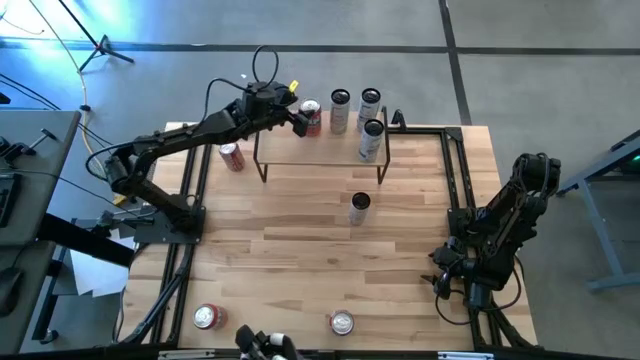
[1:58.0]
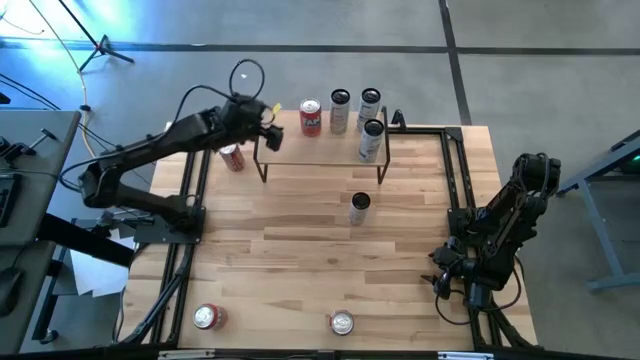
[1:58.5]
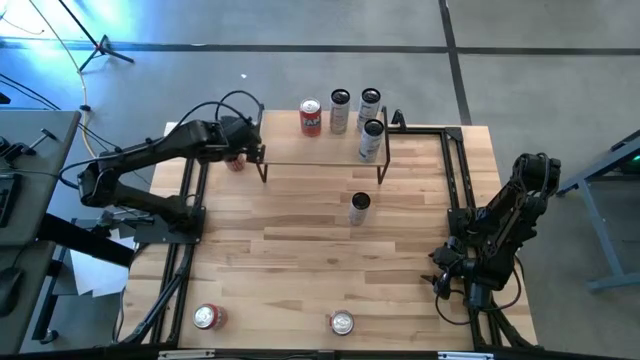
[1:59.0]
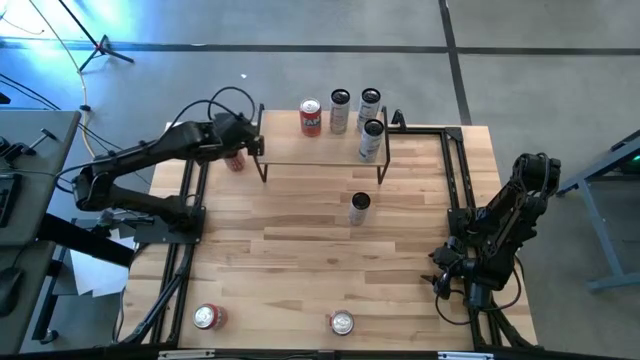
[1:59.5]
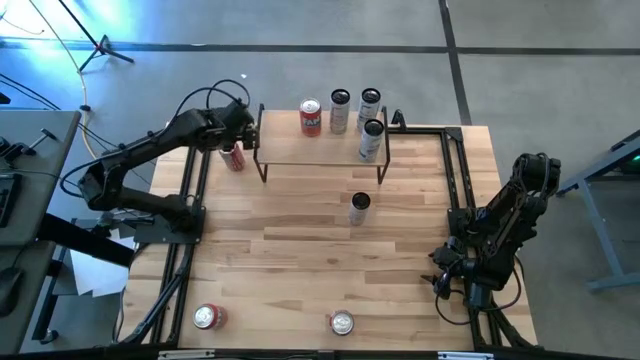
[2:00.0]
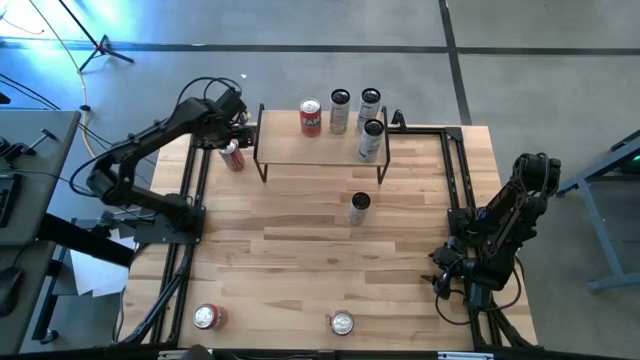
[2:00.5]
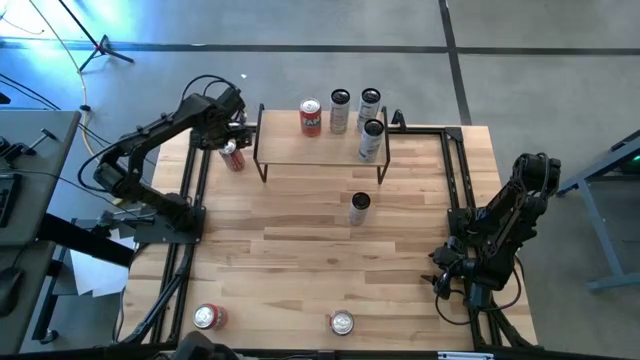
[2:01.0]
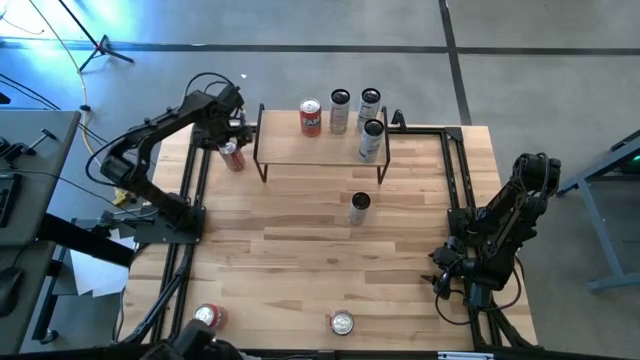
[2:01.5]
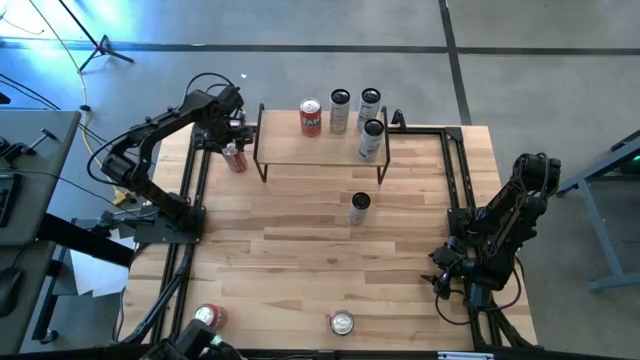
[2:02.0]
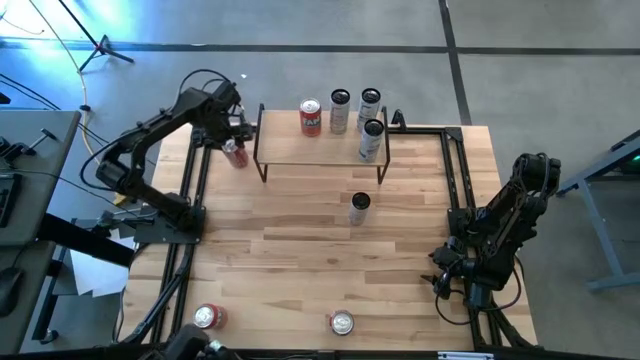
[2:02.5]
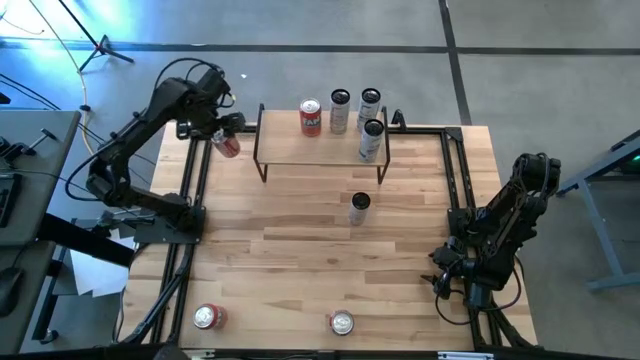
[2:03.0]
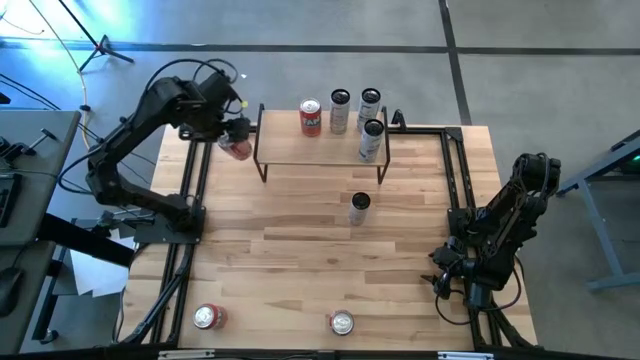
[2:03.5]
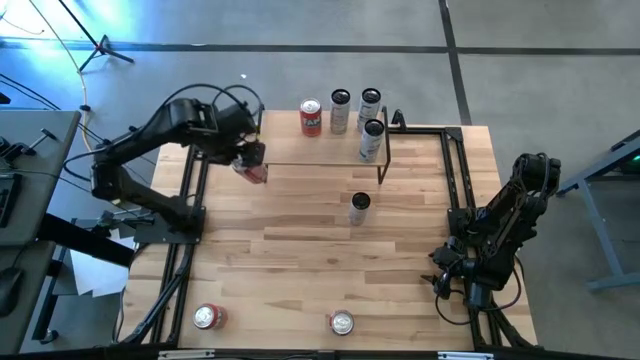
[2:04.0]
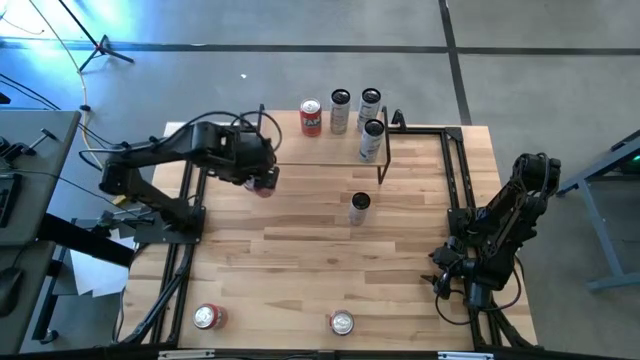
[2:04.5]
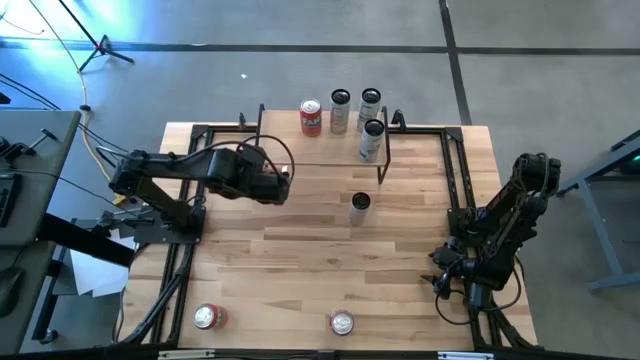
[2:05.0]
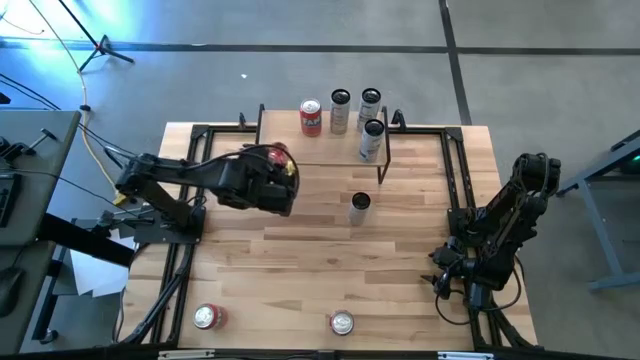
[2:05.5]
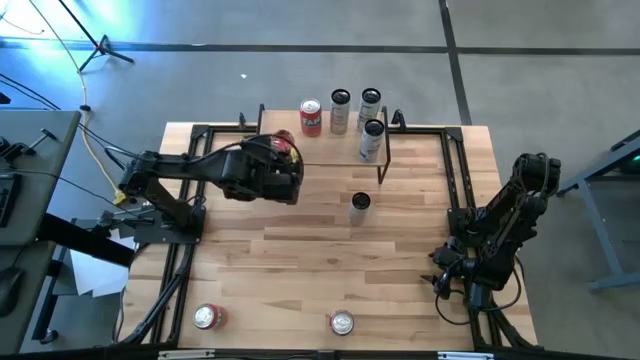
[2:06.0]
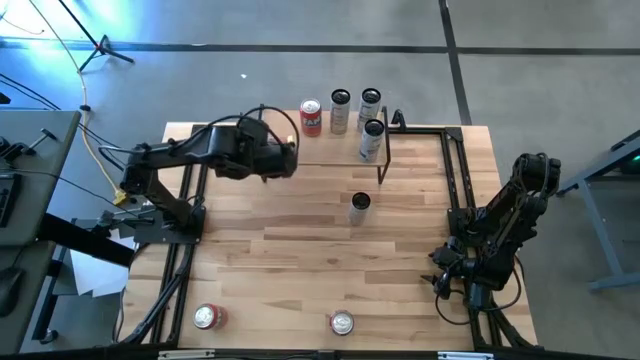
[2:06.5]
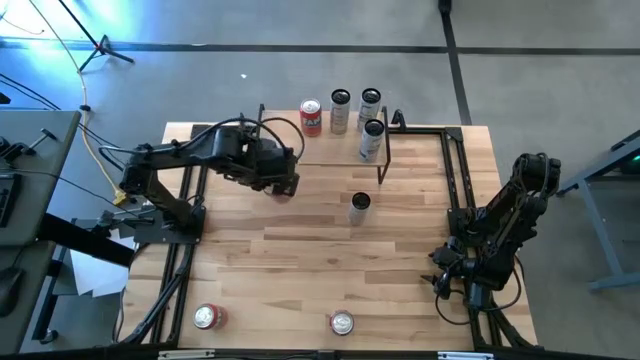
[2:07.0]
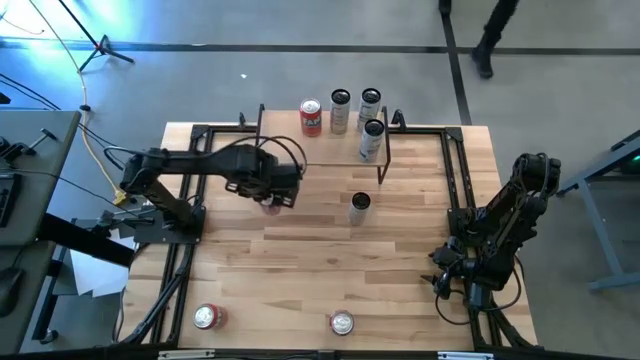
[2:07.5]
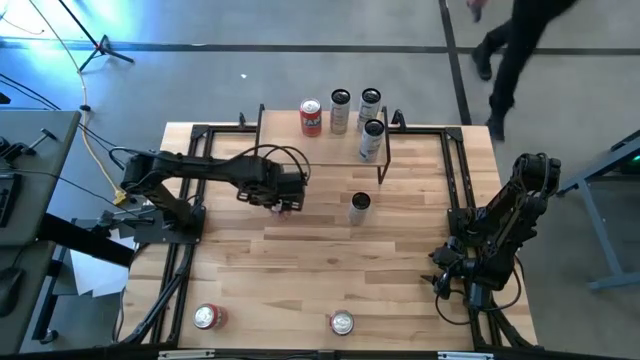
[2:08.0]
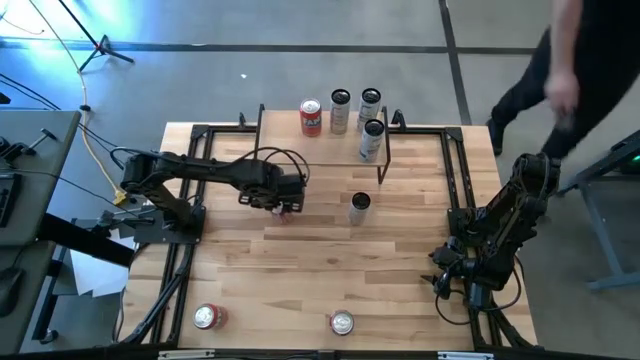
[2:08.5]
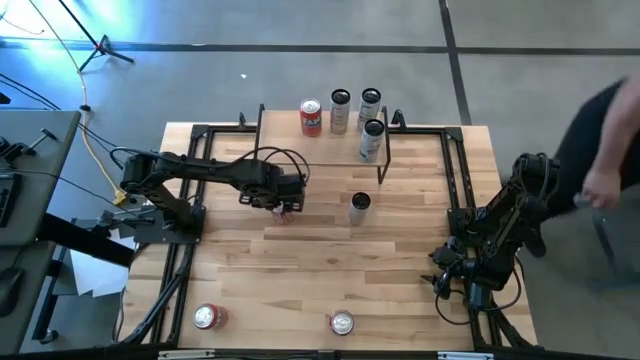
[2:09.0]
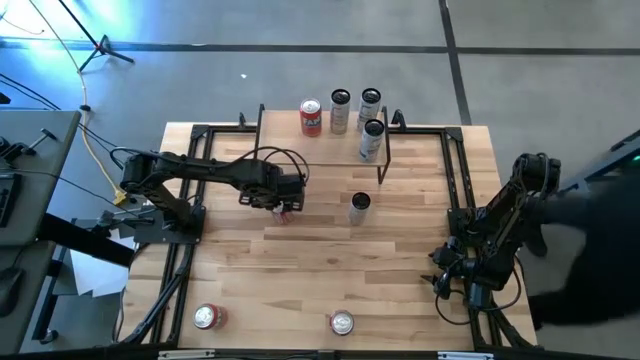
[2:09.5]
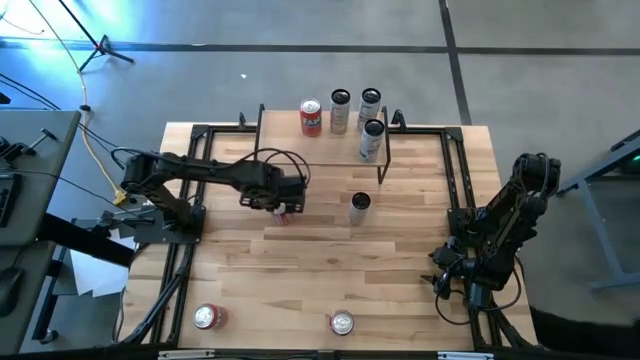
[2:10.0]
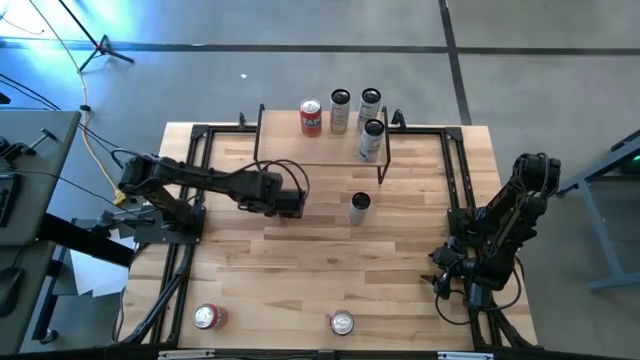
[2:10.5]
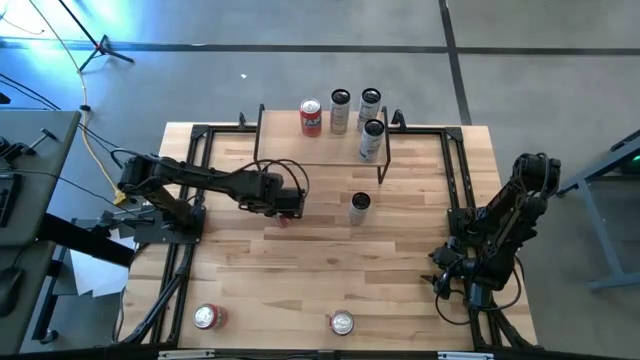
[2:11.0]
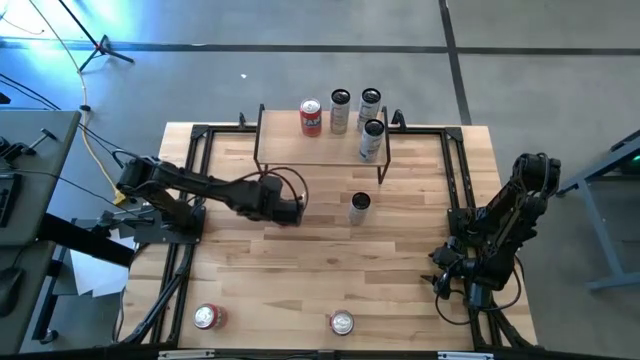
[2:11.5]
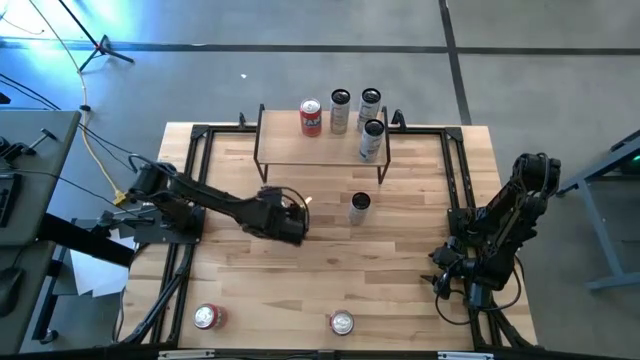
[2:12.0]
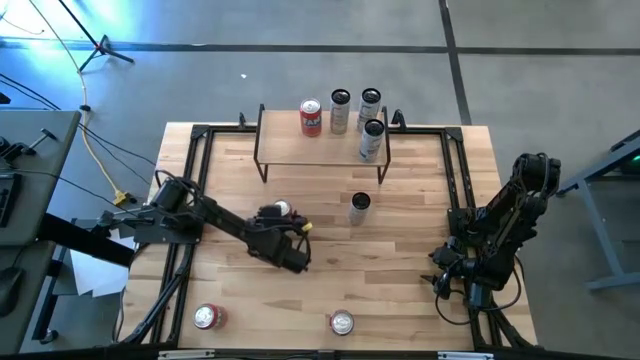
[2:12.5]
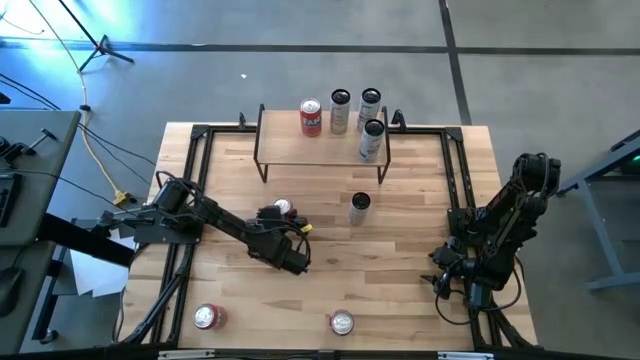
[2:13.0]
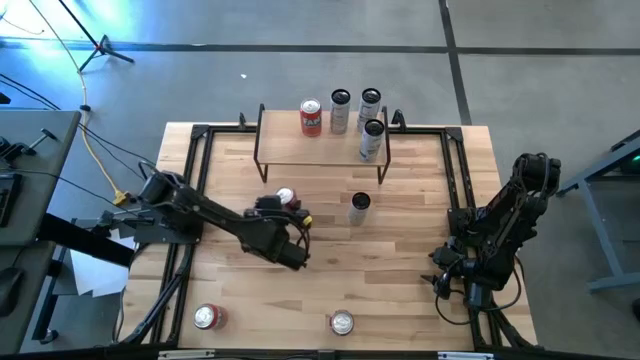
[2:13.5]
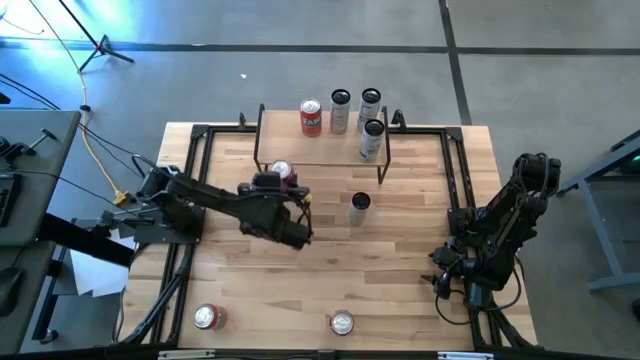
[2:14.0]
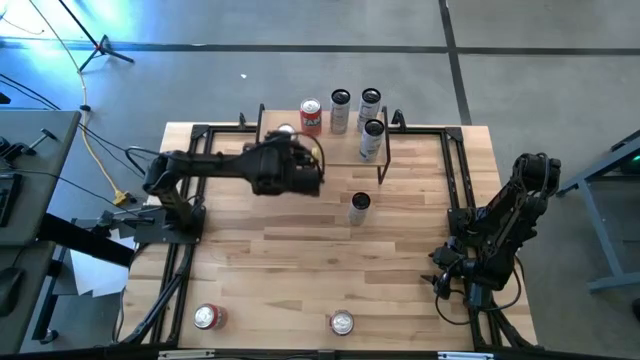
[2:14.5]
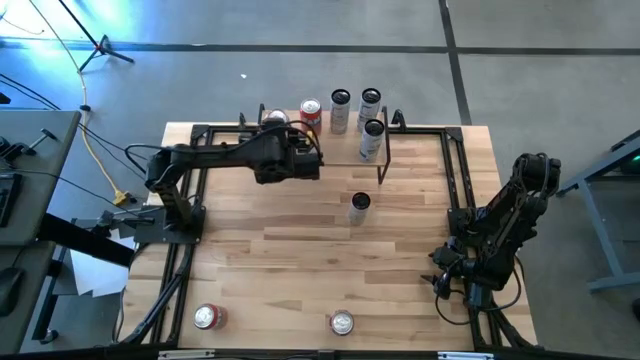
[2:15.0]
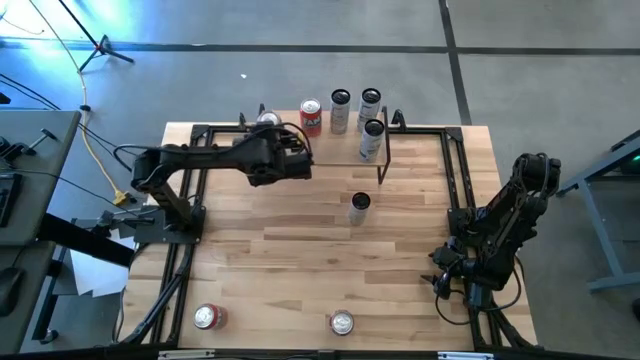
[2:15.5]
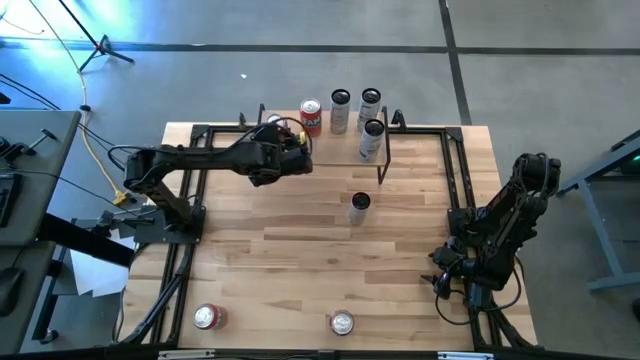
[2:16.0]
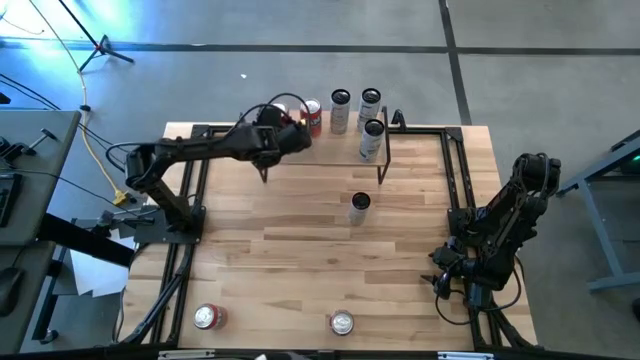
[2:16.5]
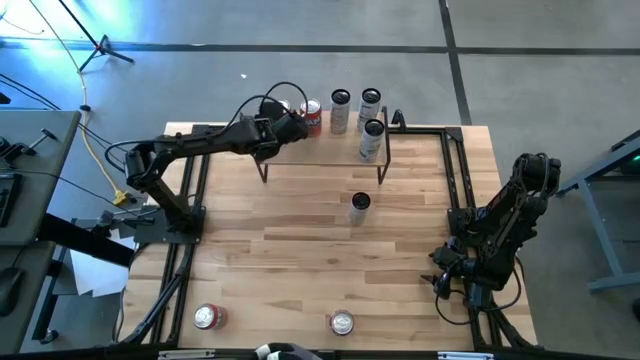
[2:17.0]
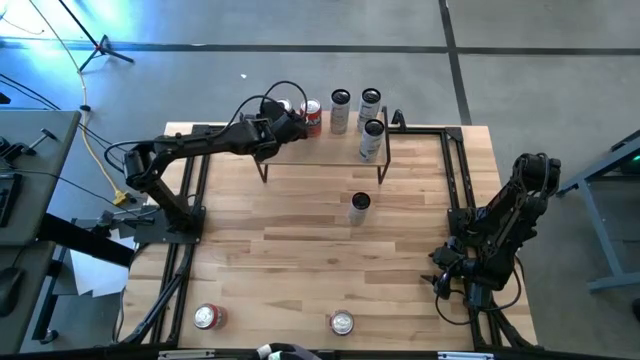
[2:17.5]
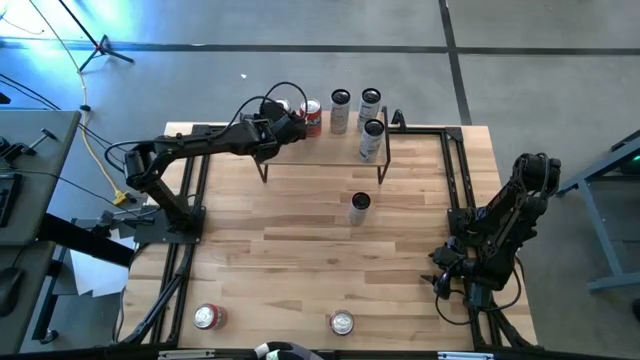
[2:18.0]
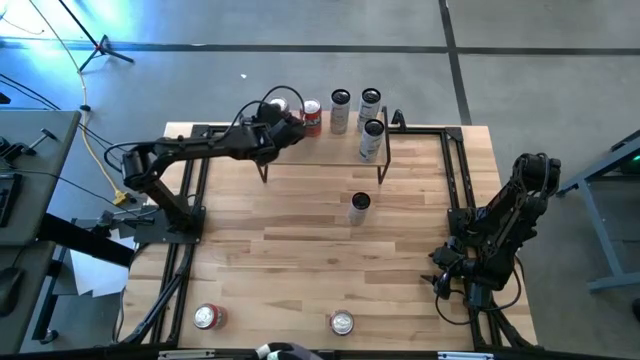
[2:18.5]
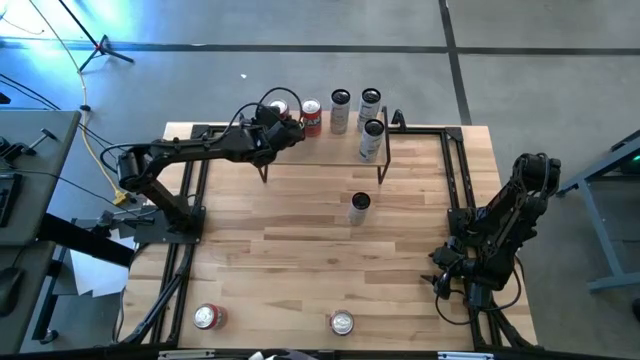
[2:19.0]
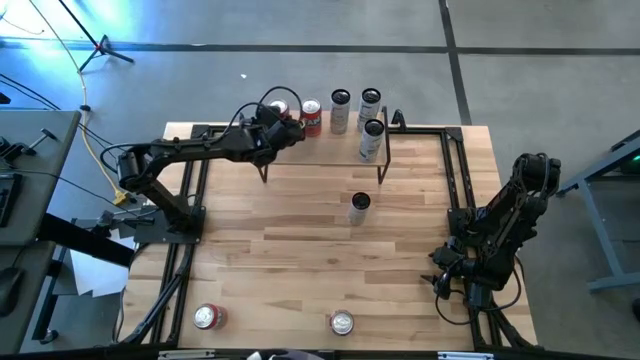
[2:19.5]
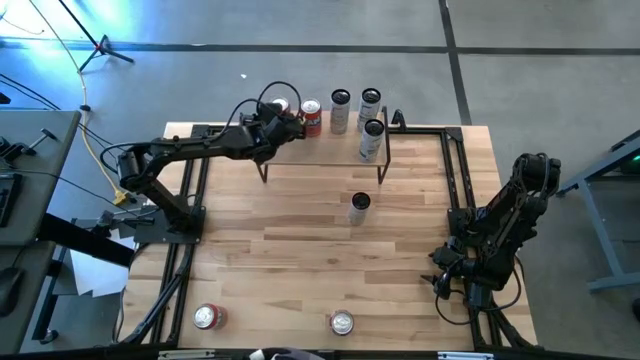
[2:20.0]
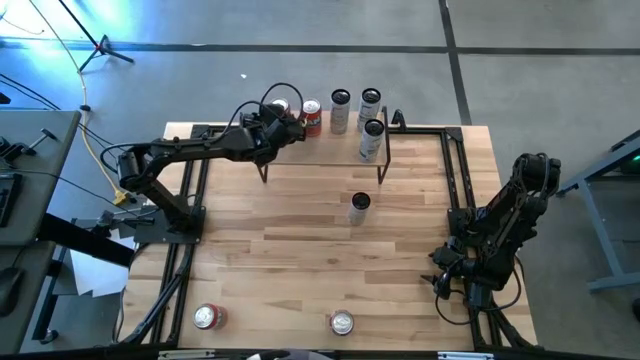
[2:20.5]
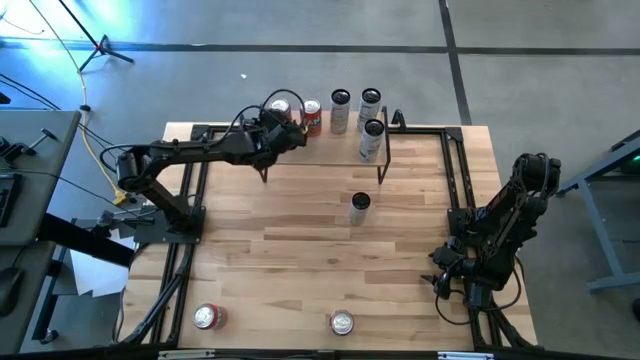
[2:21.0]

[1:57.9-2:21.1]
Task: Place canned beverage on shelf
Put the top red white soda can on the shelf
